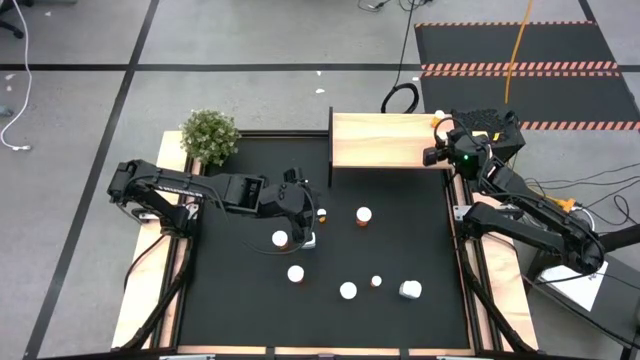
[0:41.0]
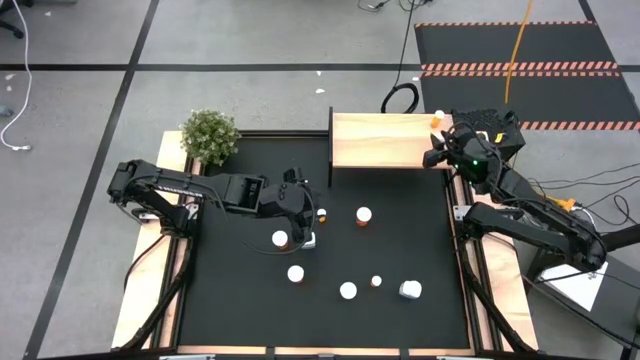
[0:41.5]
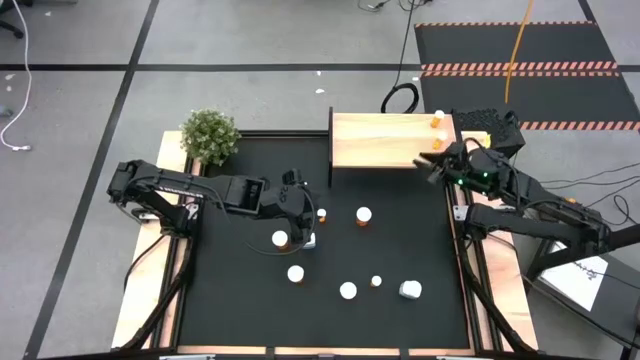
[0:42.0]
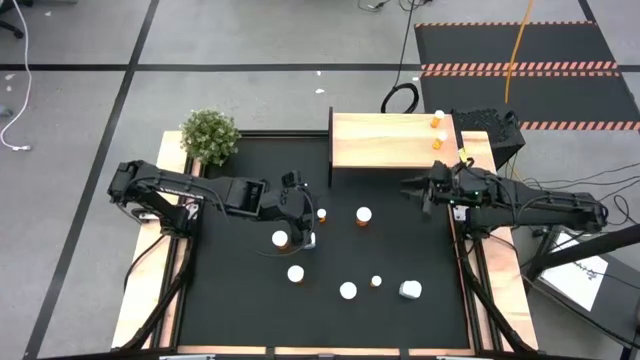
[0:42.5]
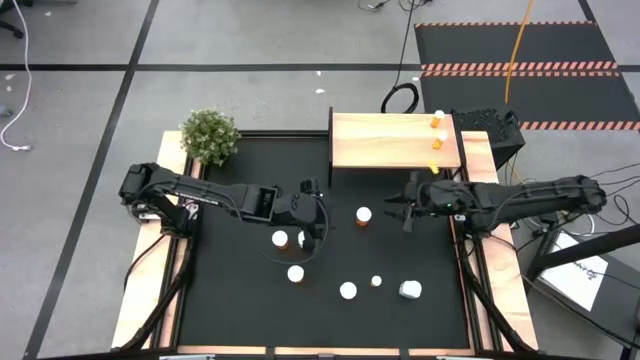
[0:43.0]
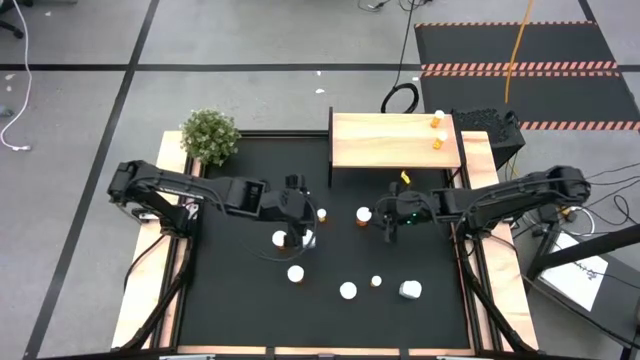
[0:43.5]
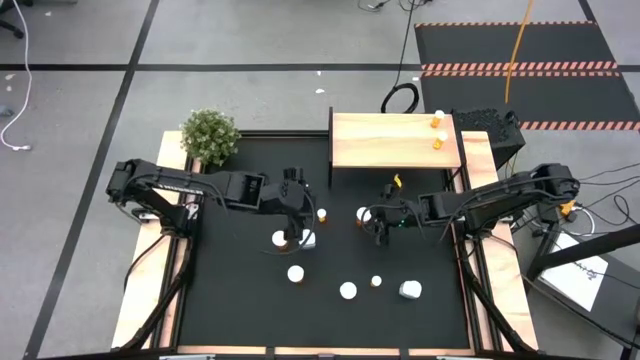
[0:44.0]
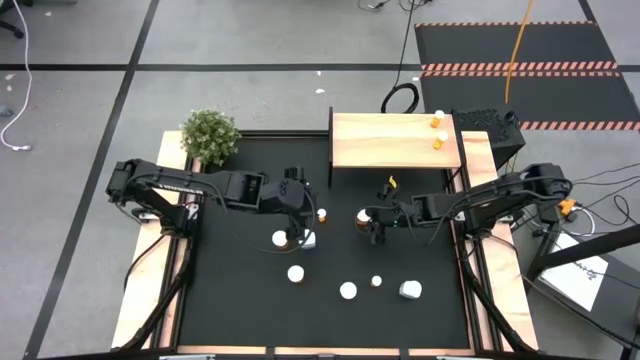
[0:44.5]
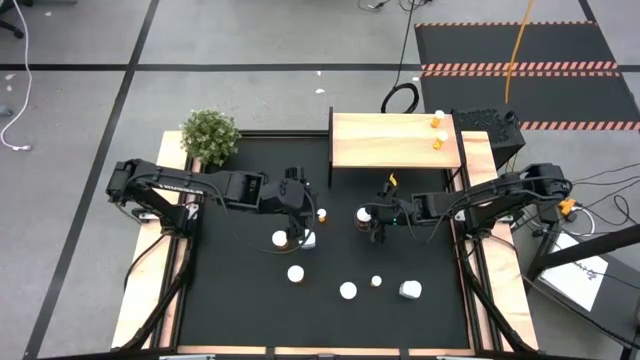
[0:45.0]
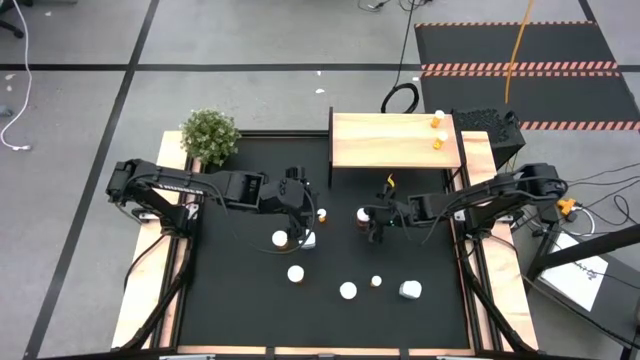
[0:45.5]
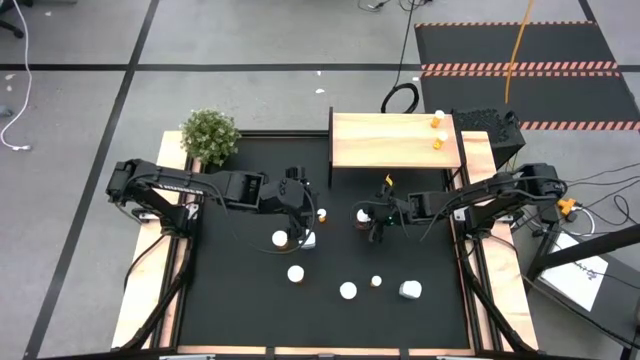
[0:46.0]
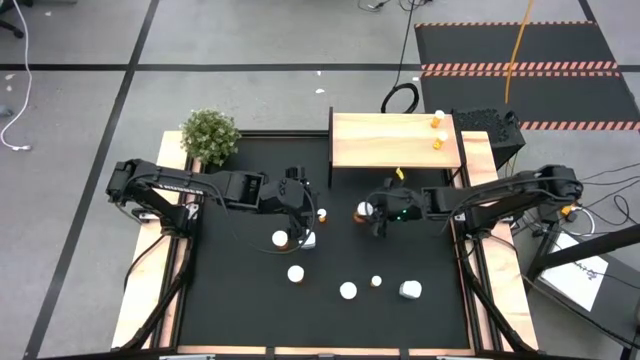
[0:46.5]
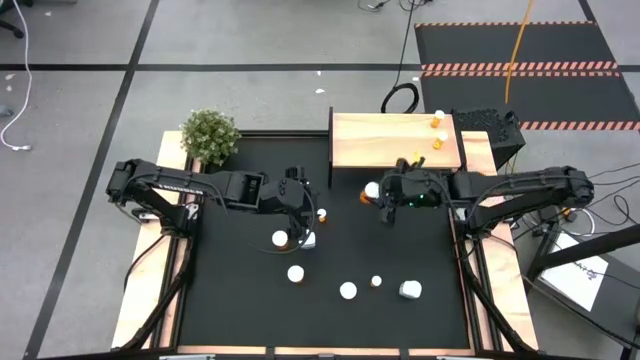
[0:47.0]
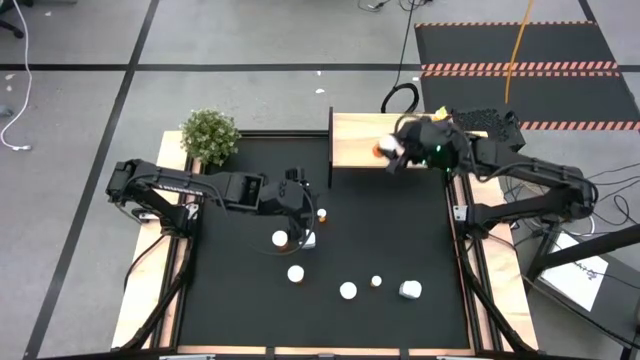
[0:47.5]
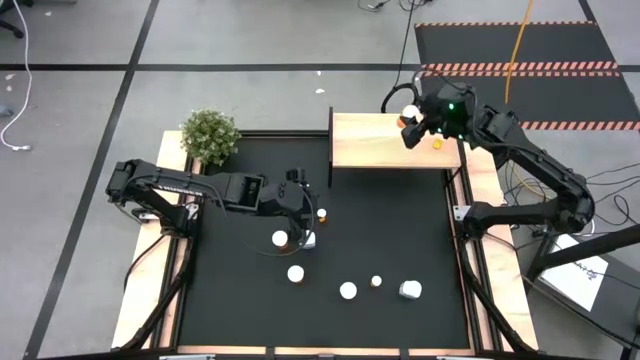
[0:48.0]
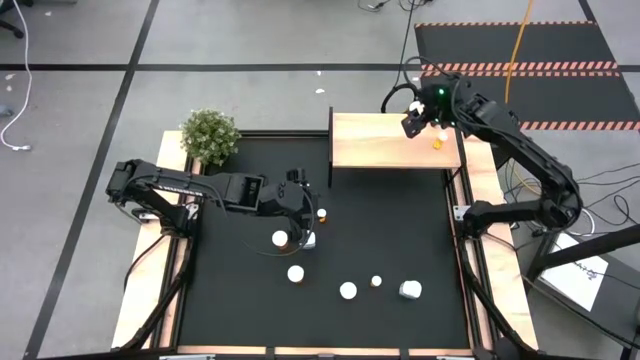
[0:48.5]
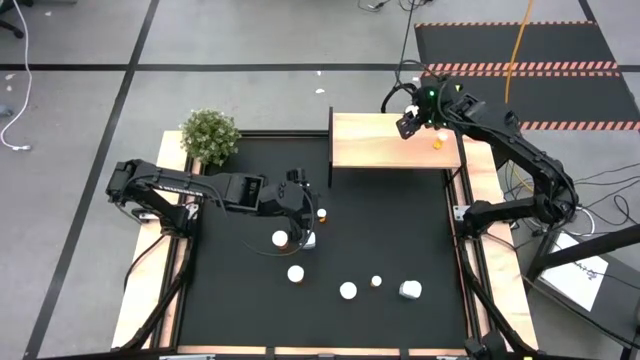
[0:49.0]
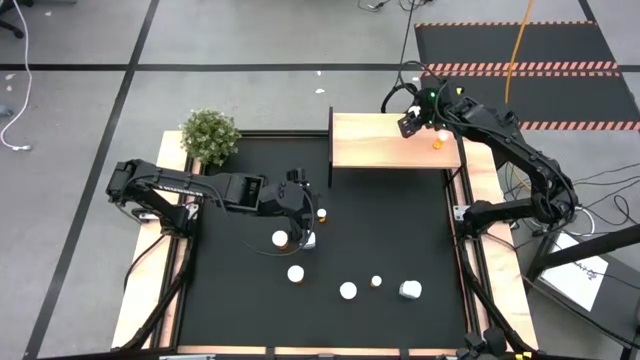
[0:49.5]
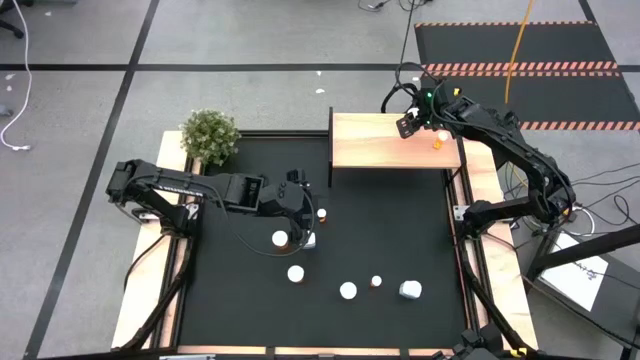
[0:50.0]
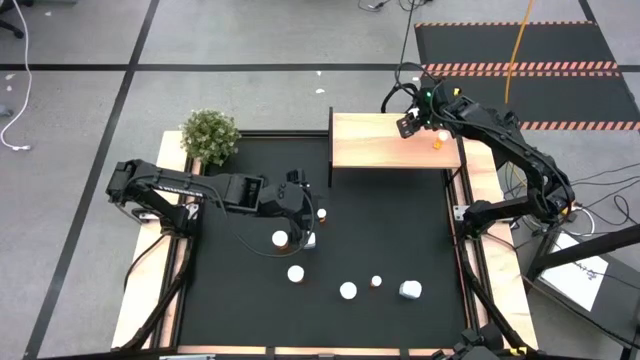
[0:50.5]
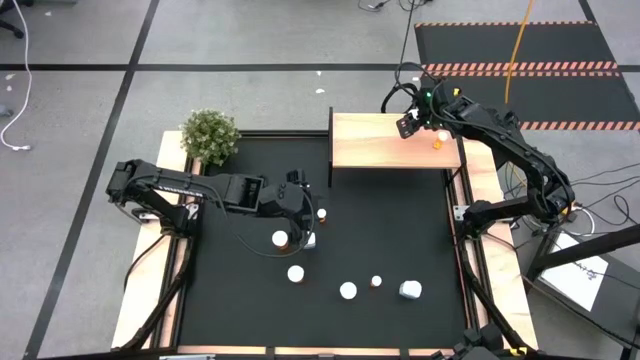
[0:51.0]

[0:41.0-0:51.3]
Task: Pick and place medicine bottles onto shelf by color
Put the large orange pill bottle on the shelf

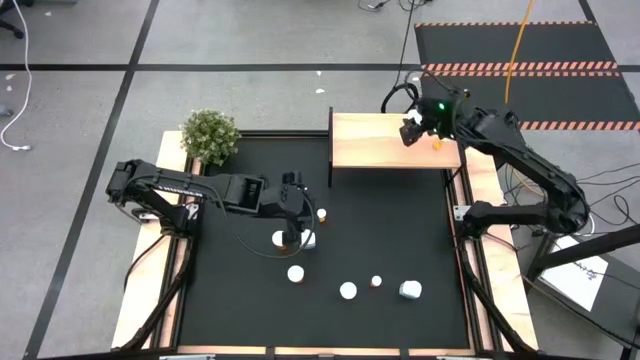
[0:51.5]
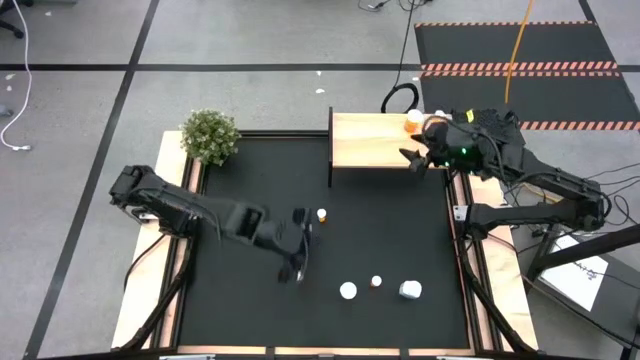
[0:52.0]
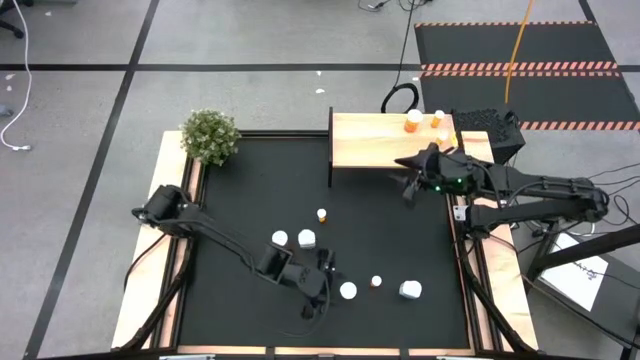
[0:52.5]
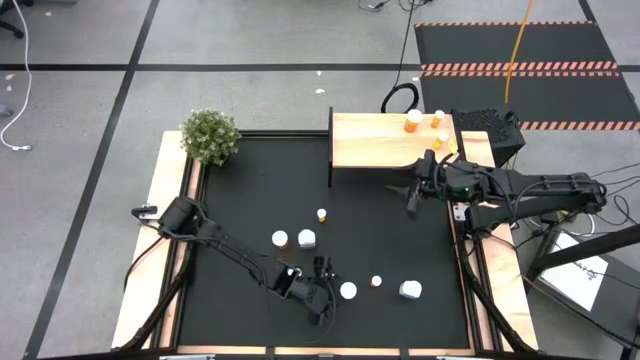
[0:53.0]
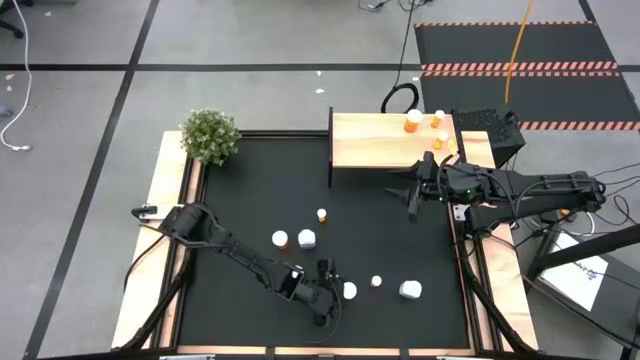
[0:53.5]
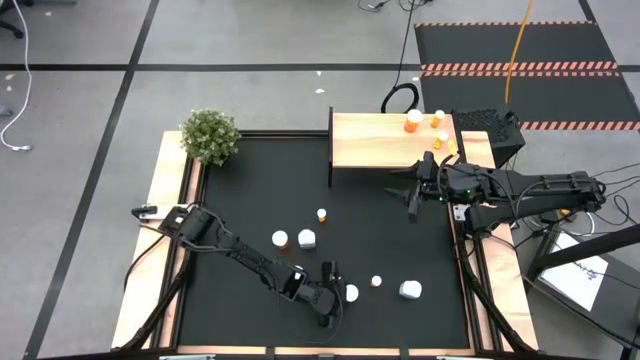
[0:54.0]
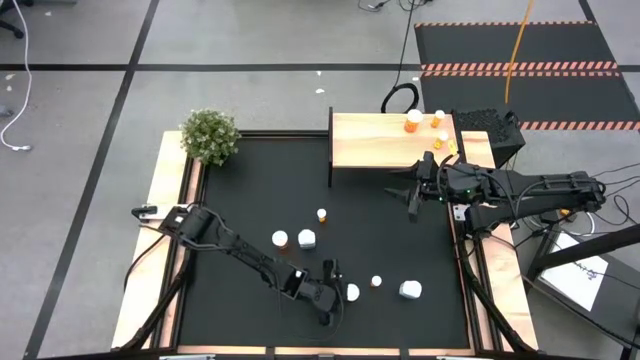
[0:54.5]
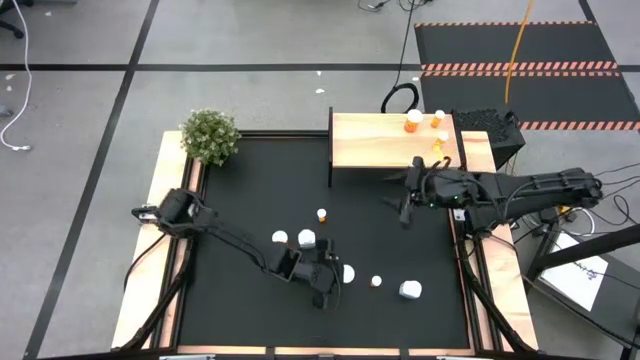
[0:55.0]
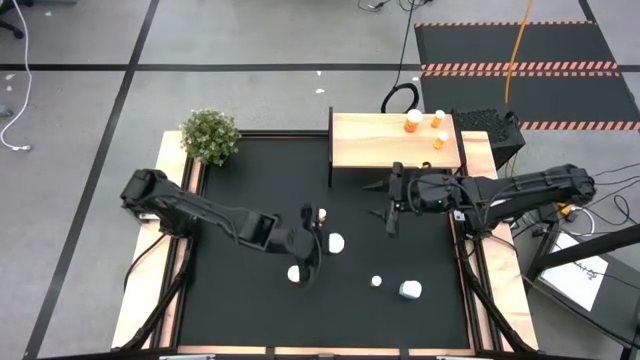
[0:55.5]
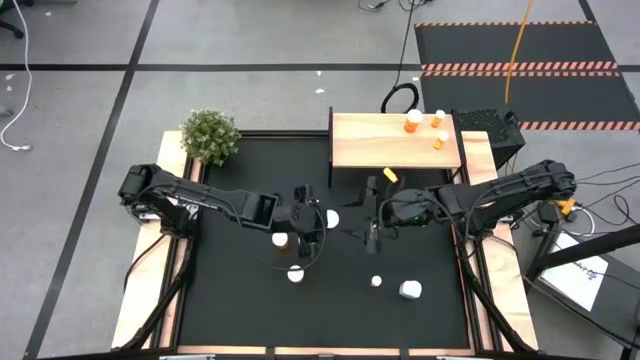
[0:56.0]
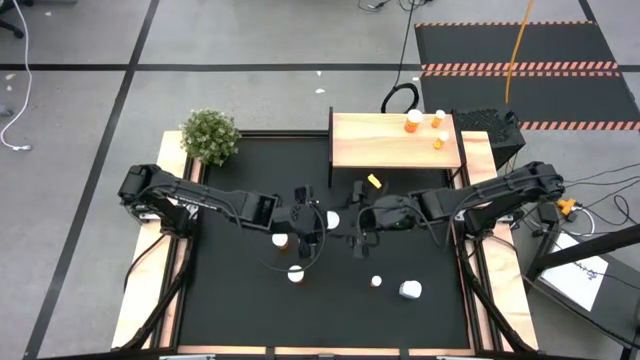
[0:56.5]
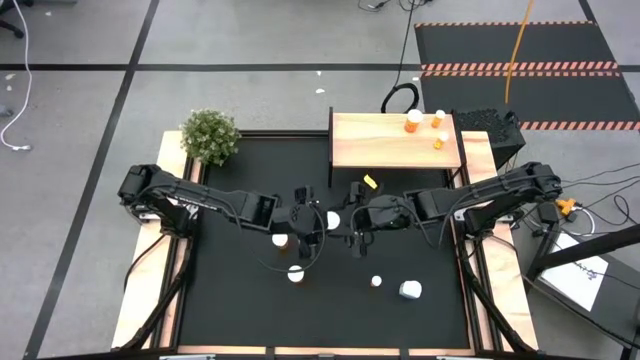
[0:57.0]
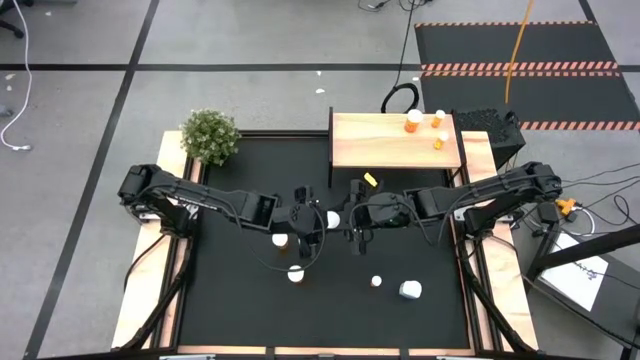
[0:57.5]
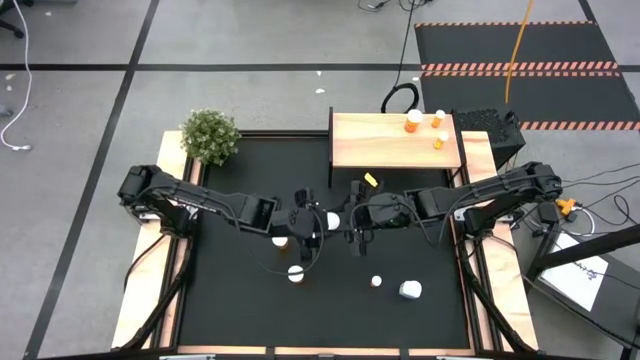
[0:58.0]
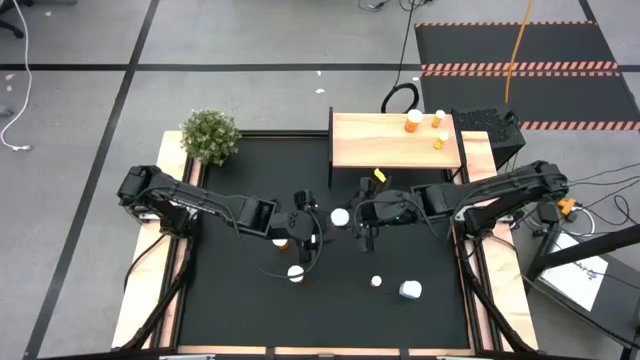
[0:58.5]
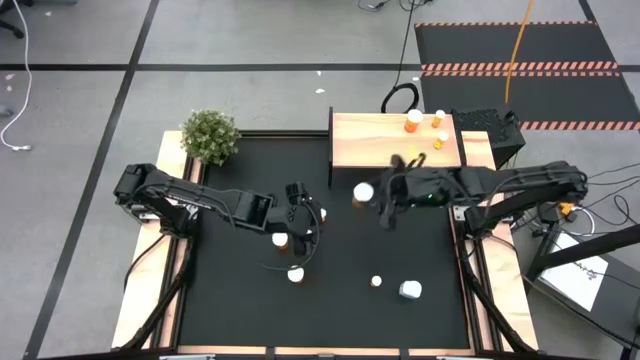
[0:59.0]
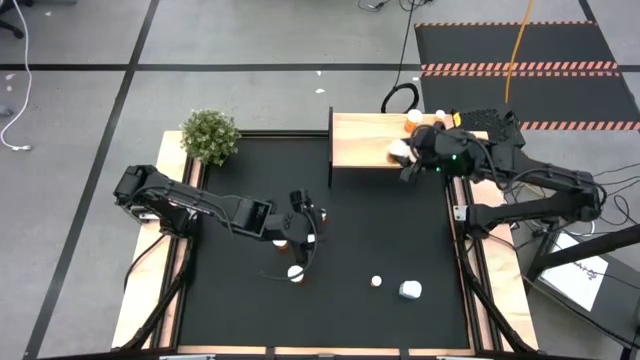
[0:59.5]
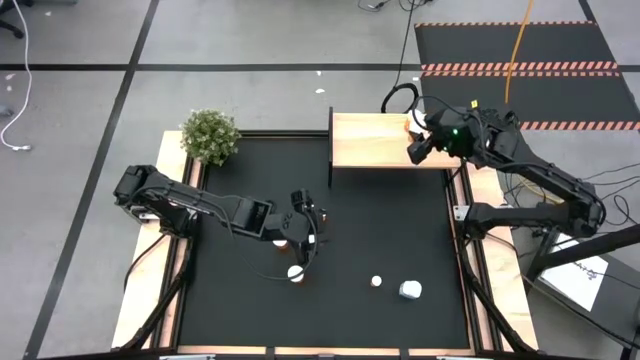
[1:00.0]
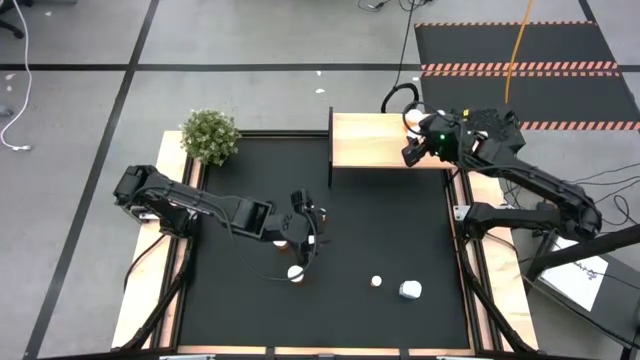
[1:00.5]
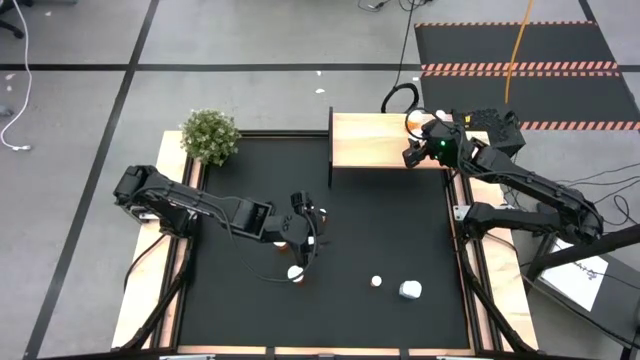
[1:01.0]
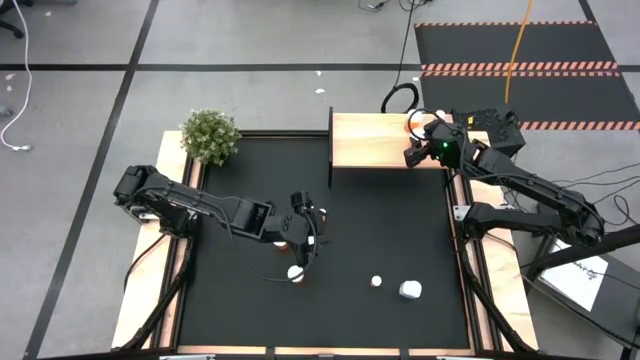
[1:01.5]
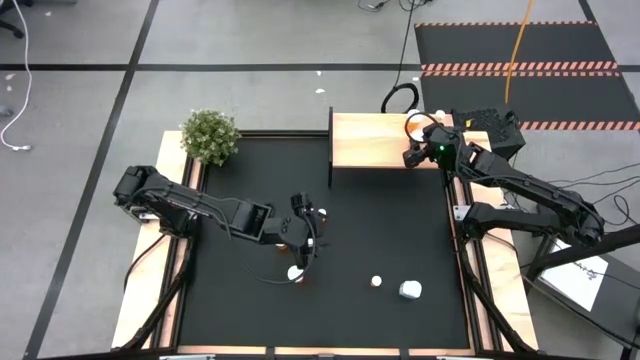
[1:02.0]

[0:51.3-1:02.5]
Put the large orange pill bottle on the shelf
